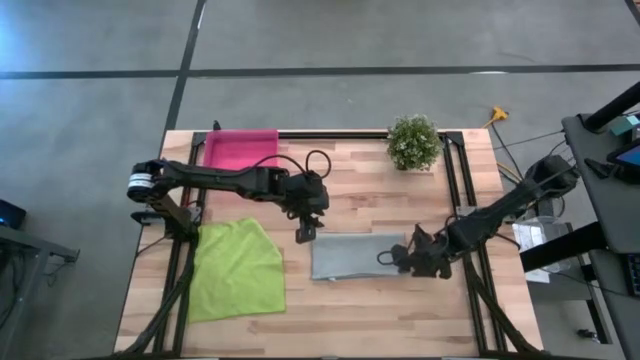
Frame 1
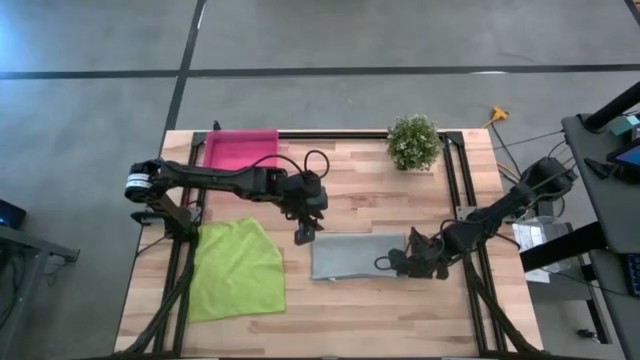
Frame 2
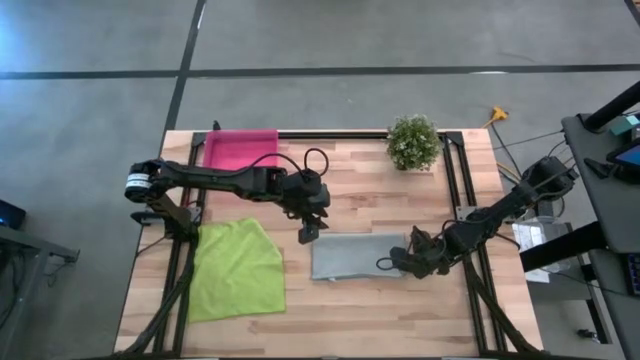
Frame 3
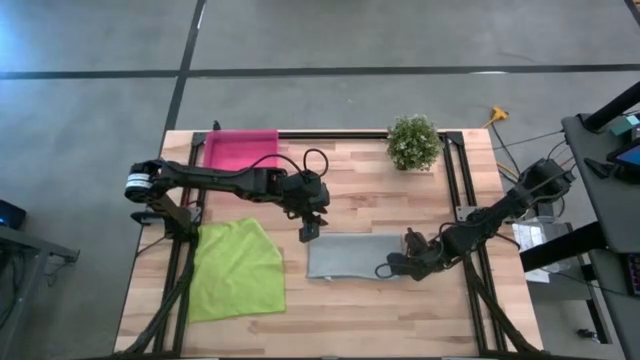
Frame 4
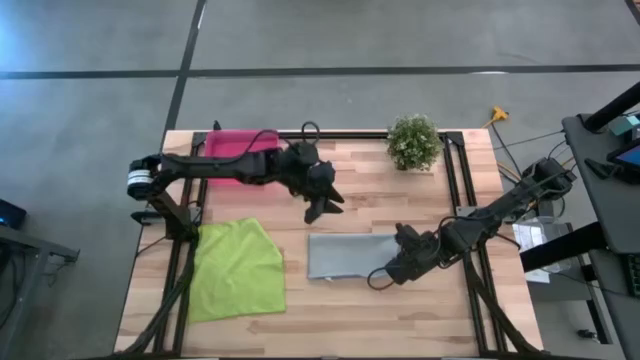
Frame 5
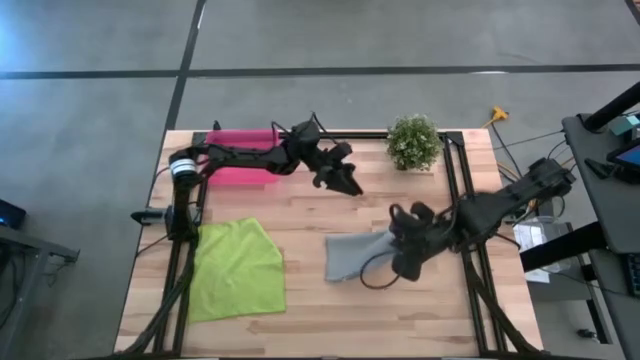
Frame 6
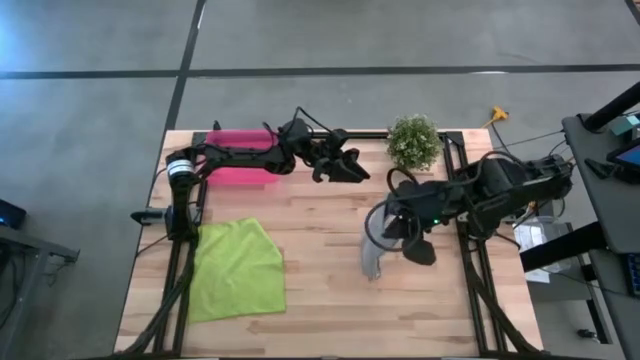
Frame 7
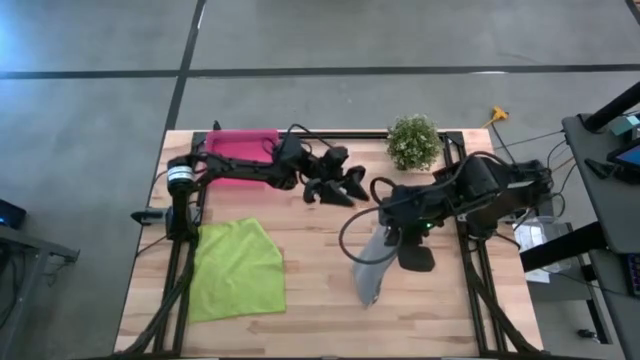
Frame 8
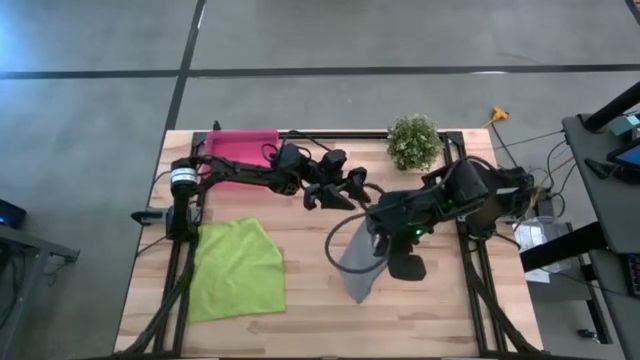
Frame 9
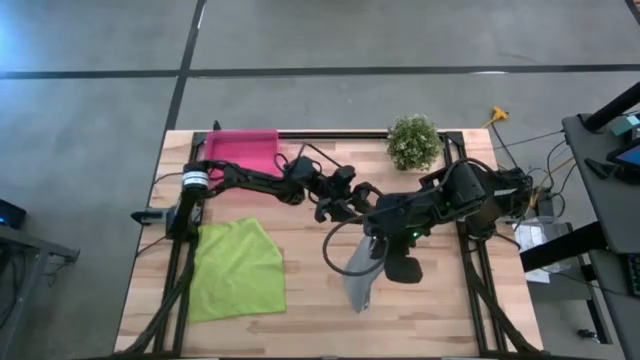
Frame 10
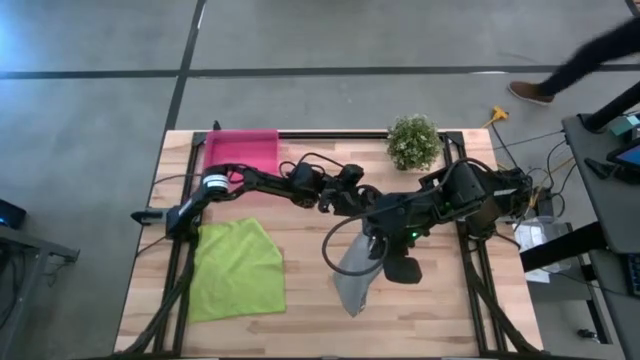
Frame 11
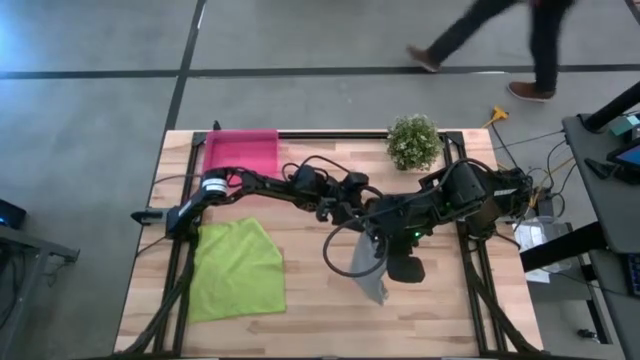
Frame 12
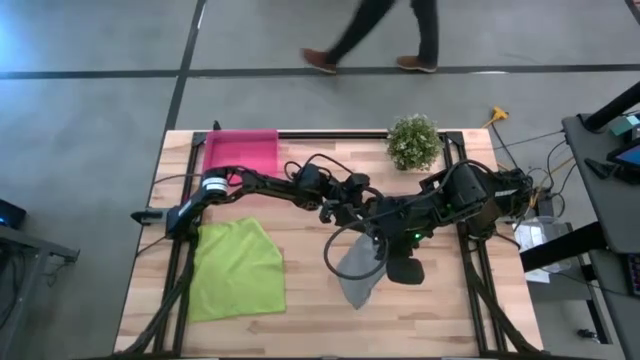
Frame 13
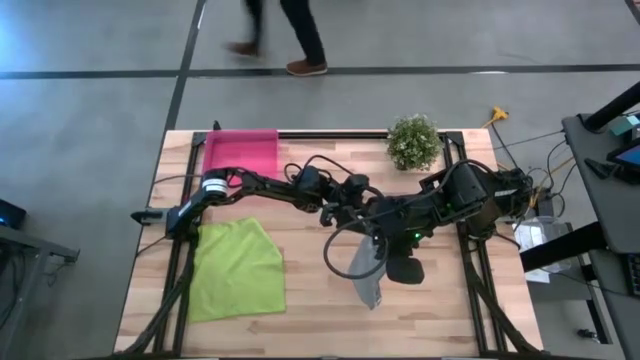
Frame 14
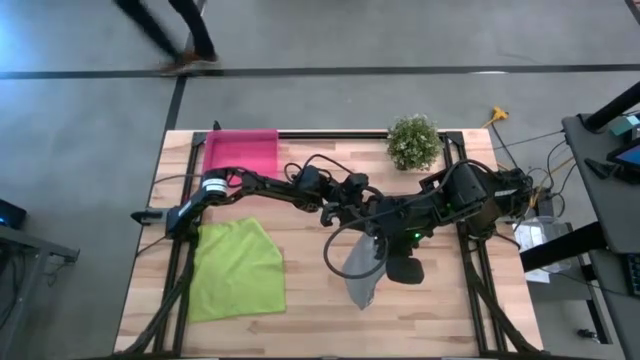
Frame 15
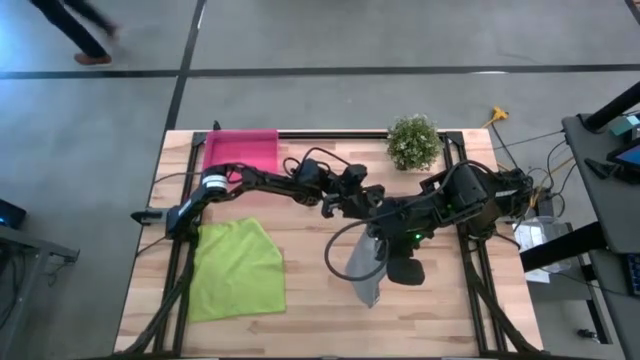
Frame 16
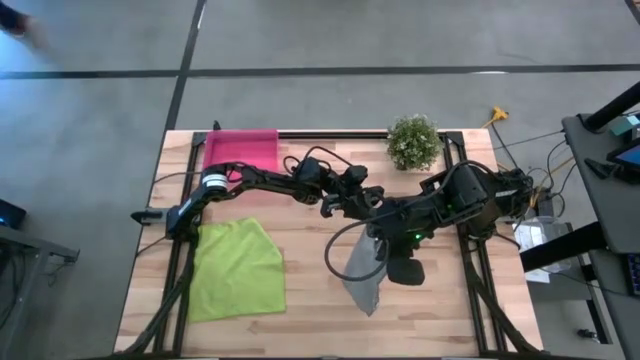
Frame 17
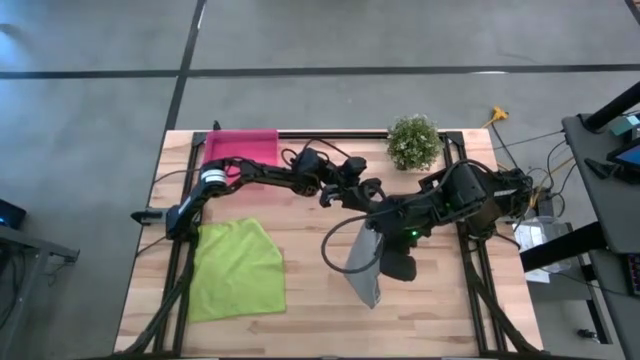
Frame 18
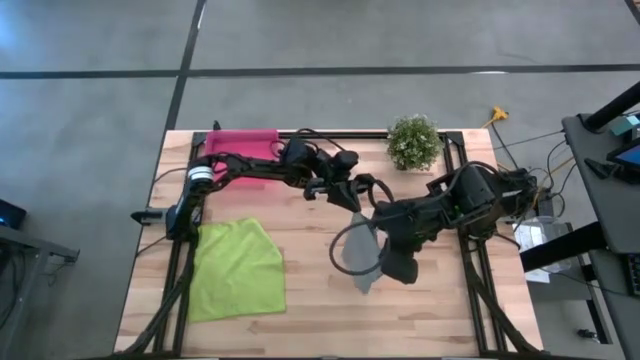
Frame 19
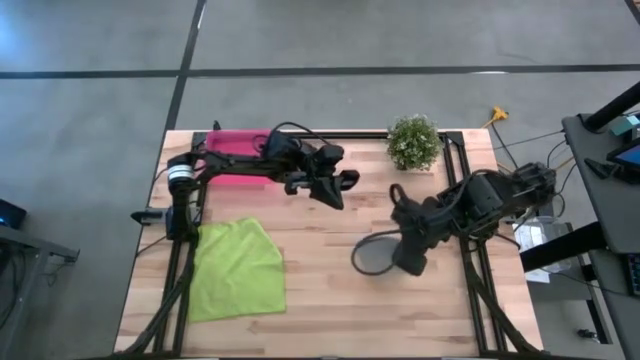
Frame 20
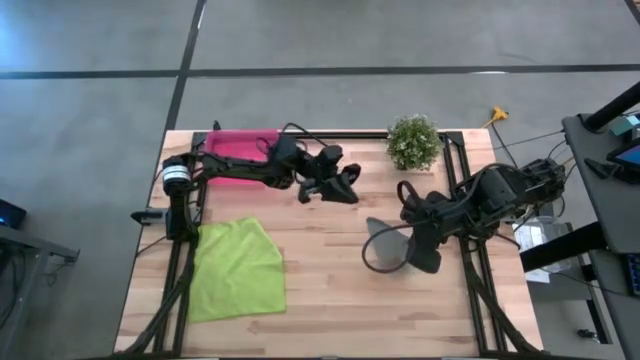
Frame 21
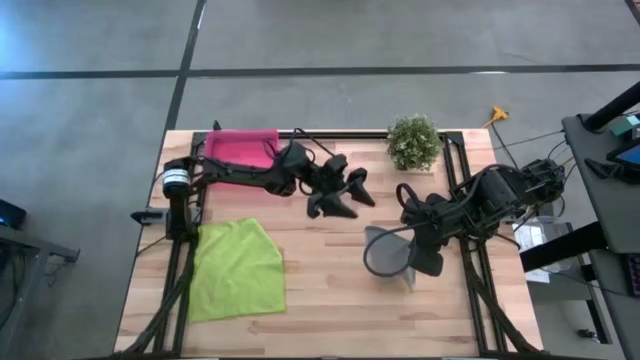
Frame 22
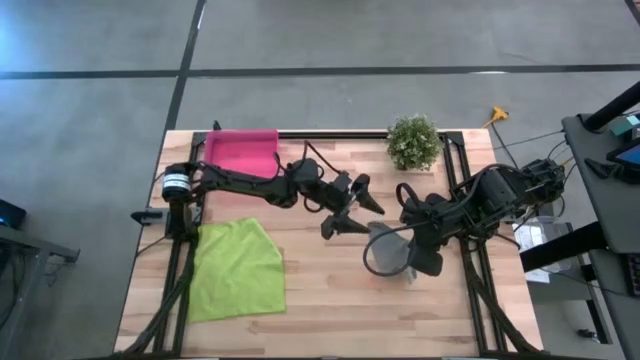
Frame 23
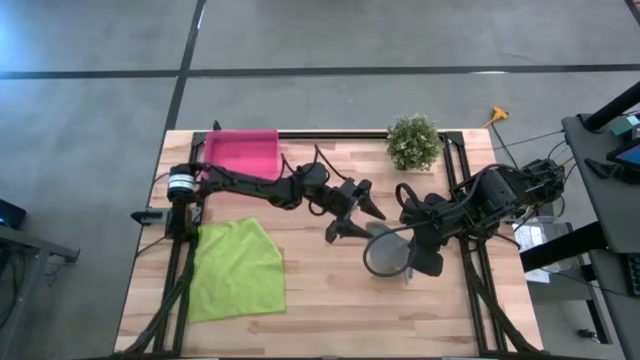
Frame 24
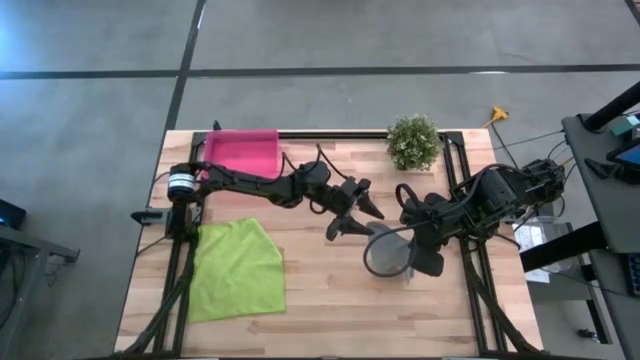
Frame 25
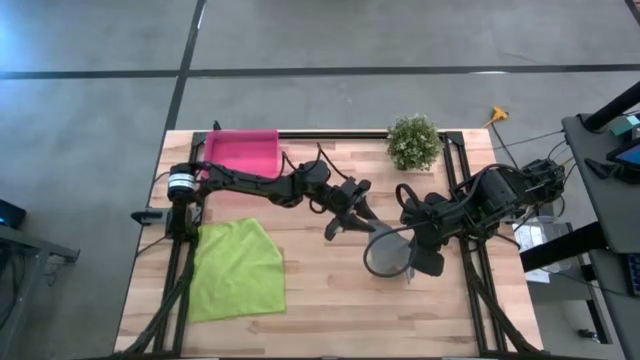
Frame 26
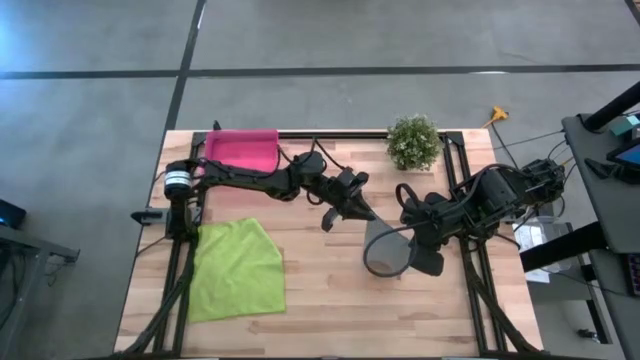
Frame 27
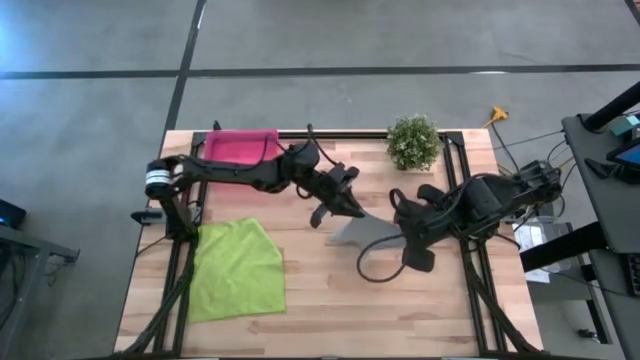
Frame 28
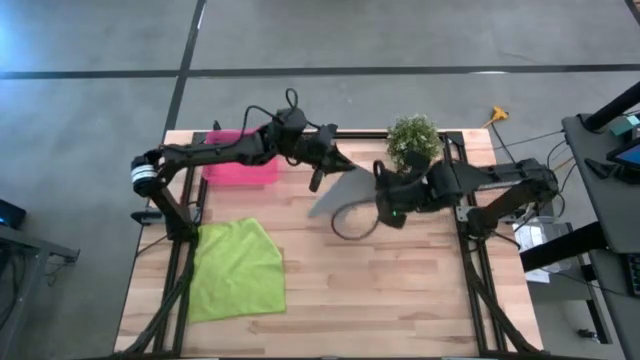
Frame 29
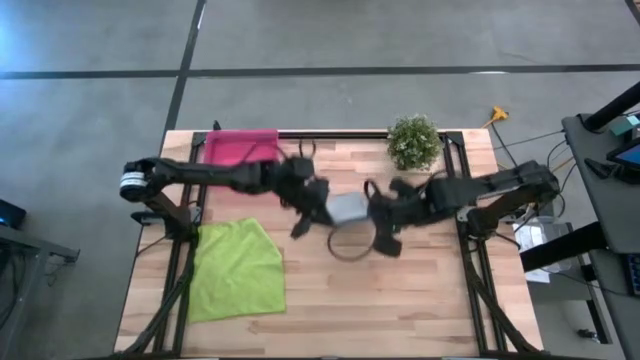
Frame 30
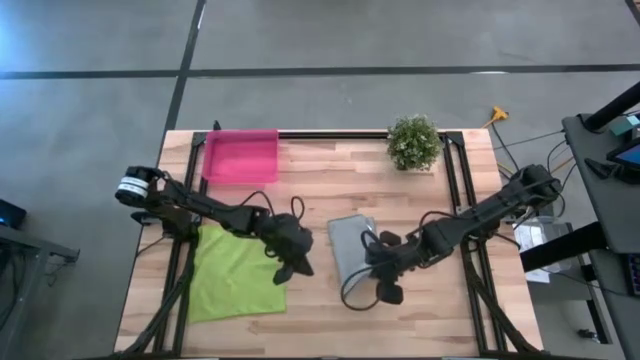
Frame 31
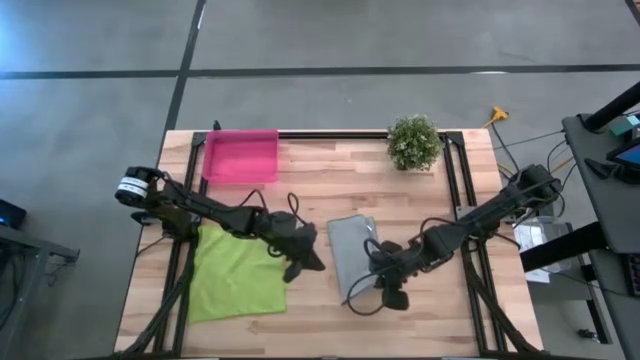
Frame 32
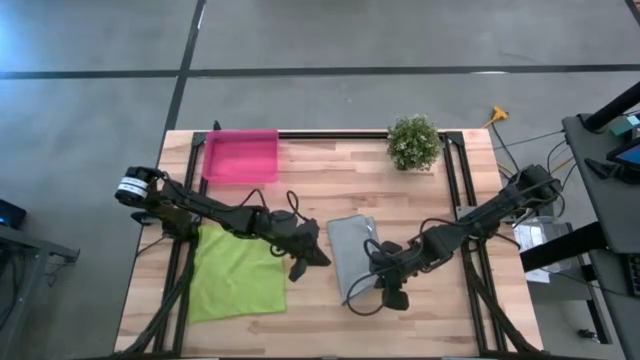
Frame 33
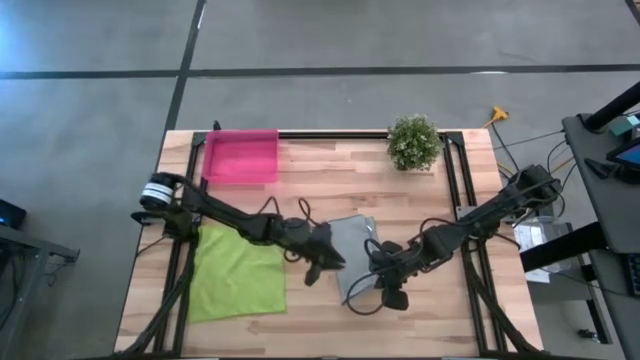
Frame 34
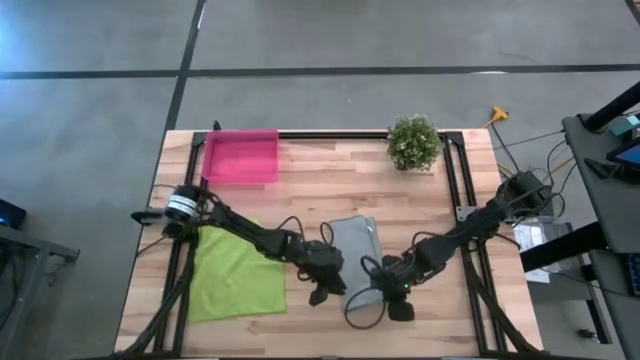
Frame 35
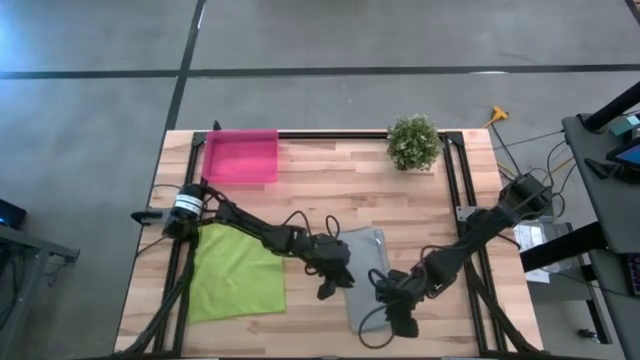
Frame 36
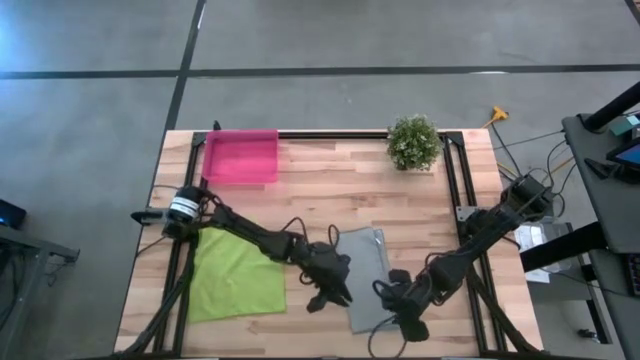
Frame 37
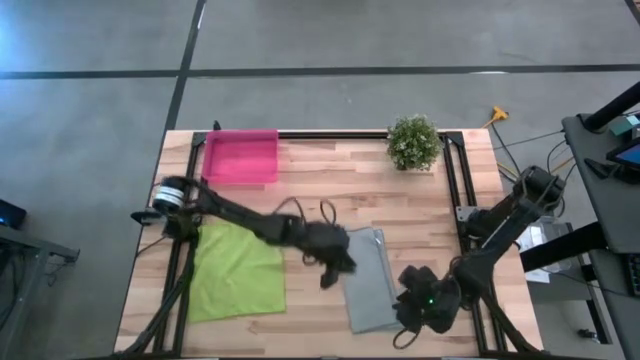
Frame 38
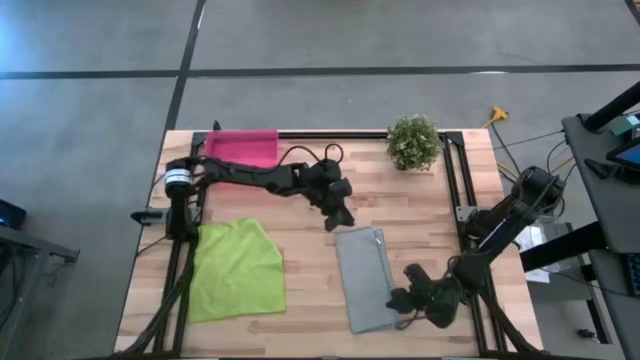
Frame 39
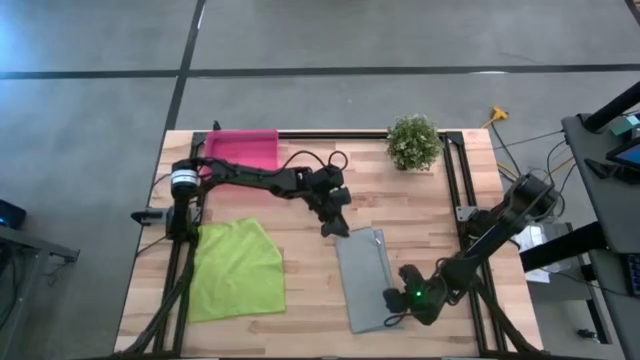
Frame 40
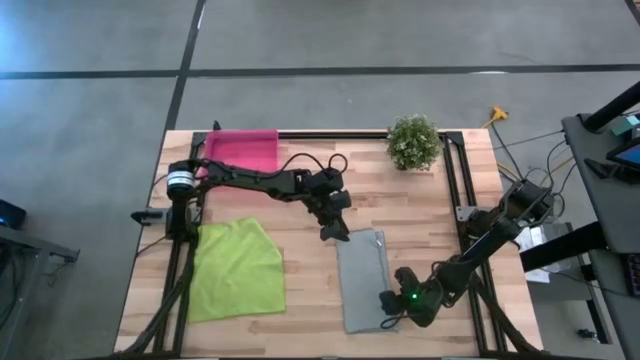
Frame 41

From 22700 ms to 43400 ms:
Task: Roll microfiber towels into tight, uniform cylinder then place into a basket
Roll the blue microfiber cloth

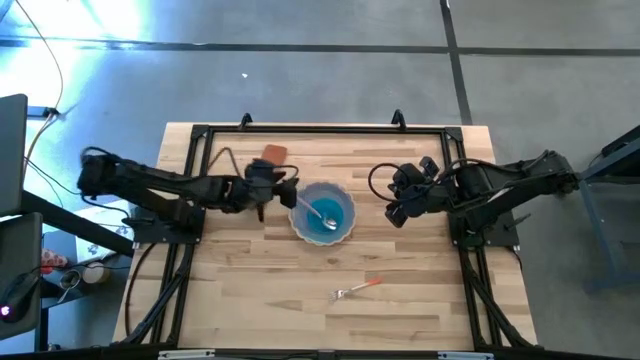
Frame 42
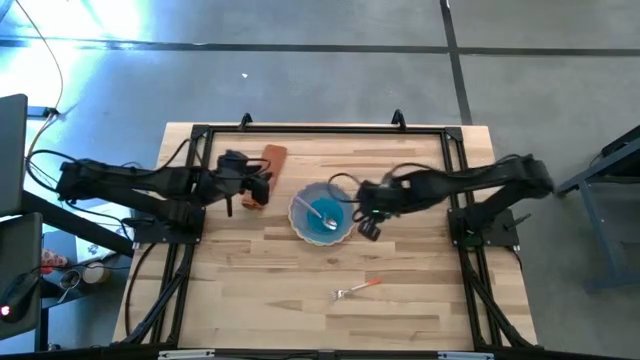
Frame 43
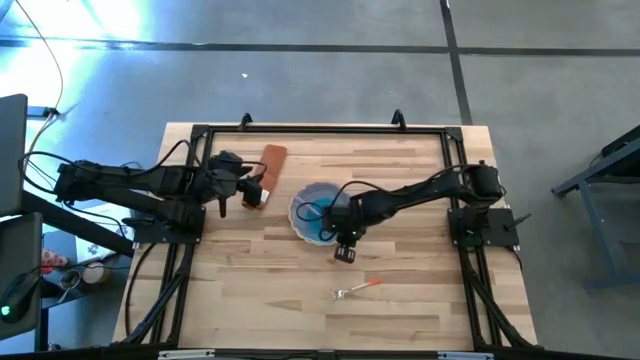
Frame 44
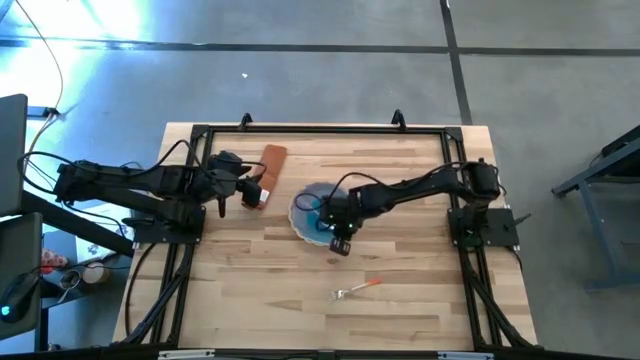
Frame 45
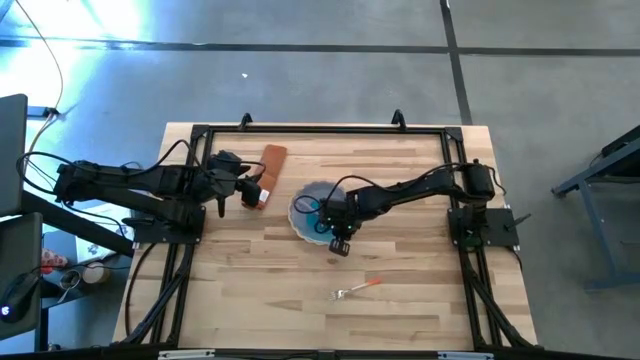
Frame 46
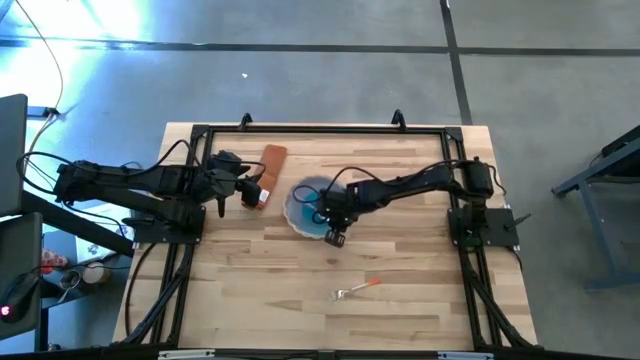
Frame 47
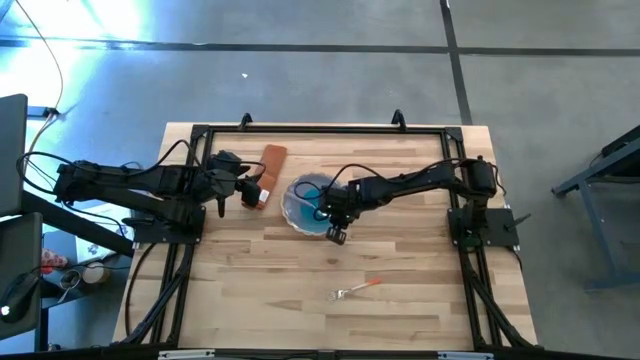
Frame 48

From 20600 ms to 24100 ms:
Task: Set table place
Adjust the light blue plate
